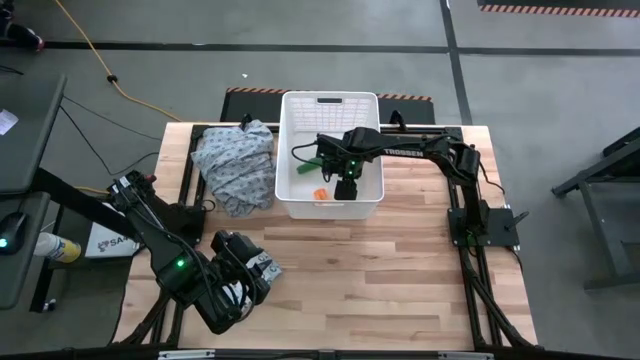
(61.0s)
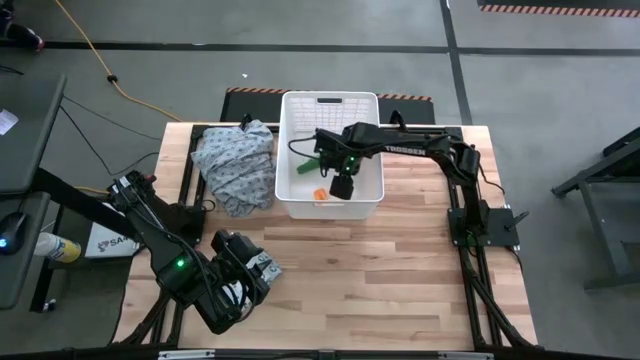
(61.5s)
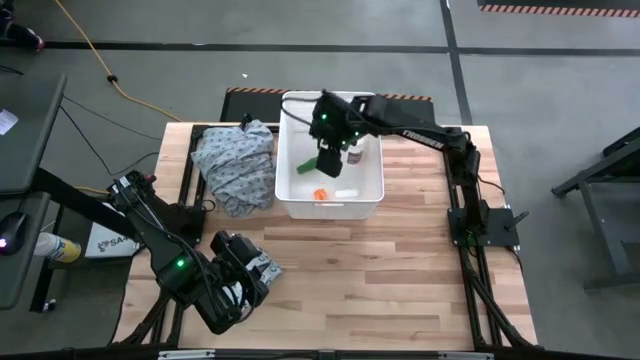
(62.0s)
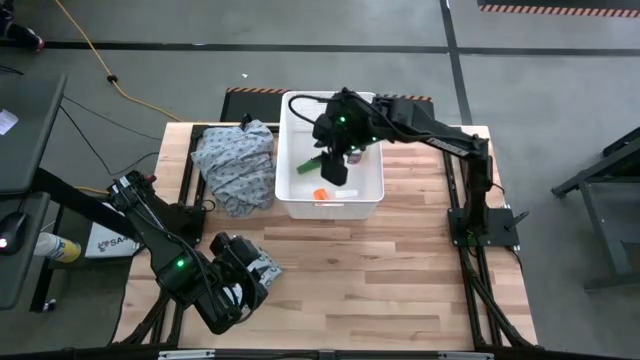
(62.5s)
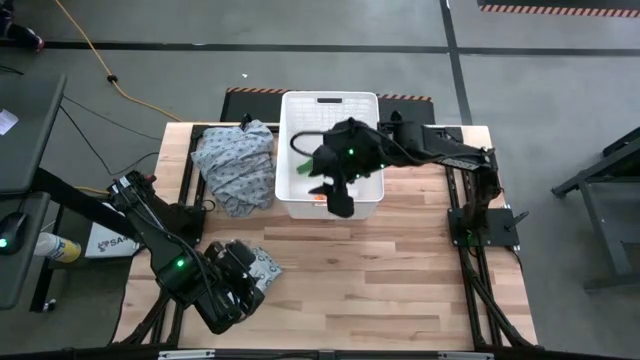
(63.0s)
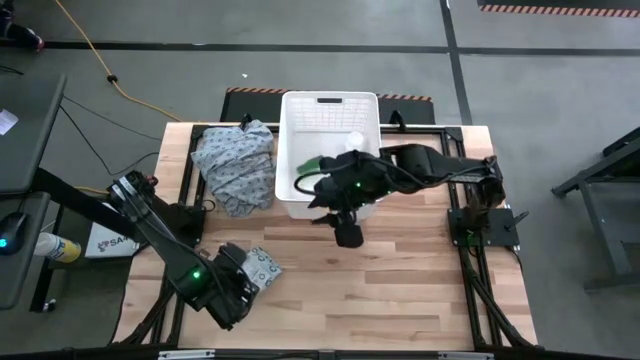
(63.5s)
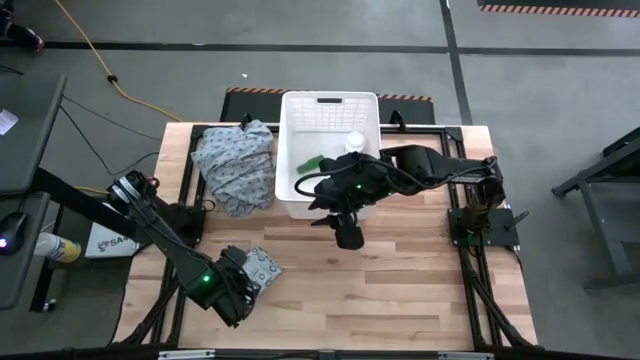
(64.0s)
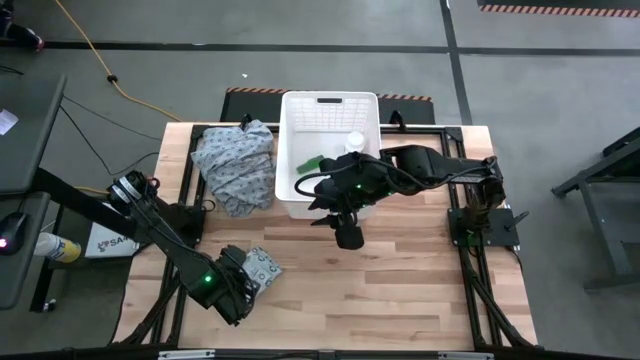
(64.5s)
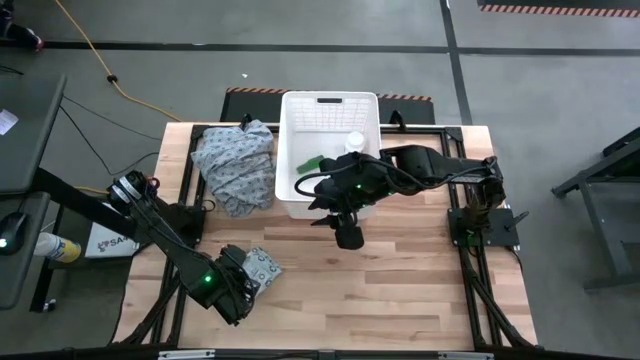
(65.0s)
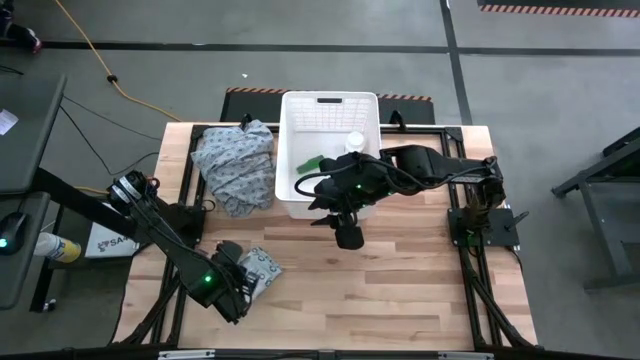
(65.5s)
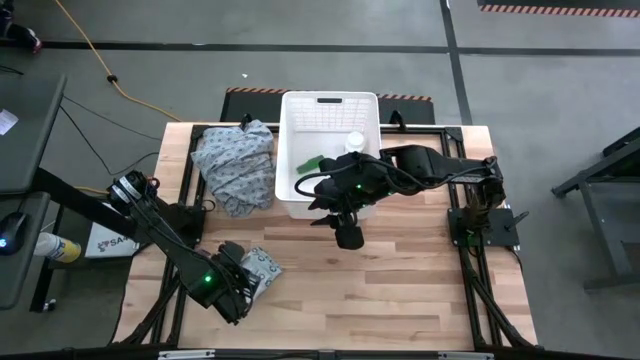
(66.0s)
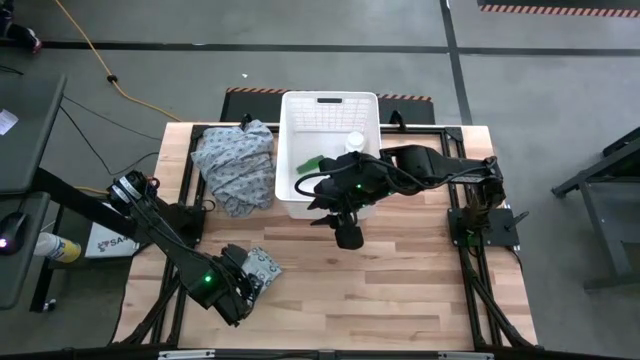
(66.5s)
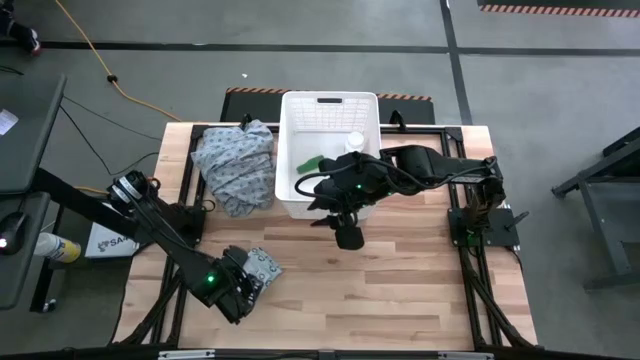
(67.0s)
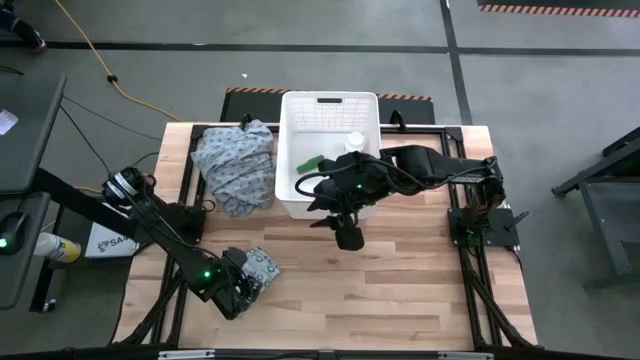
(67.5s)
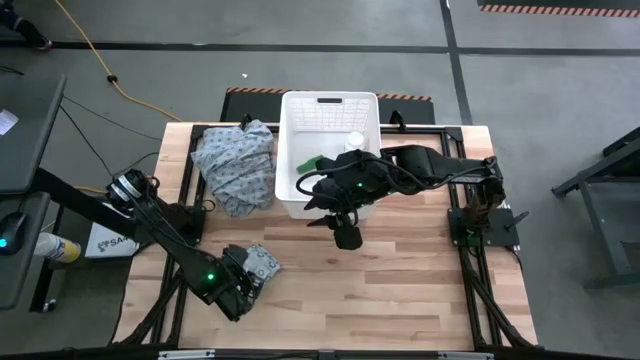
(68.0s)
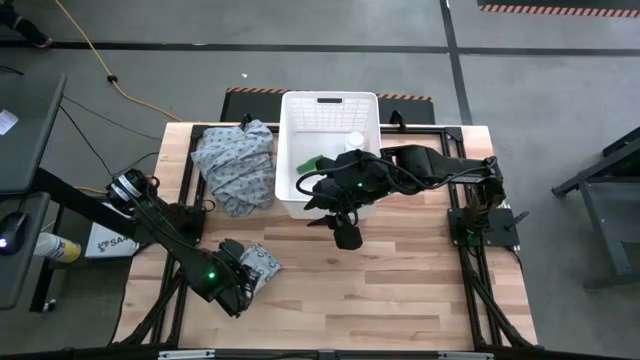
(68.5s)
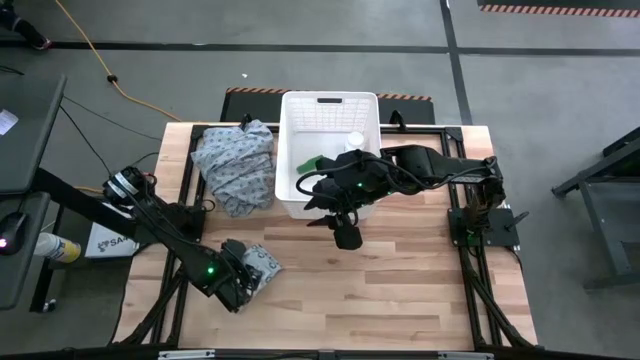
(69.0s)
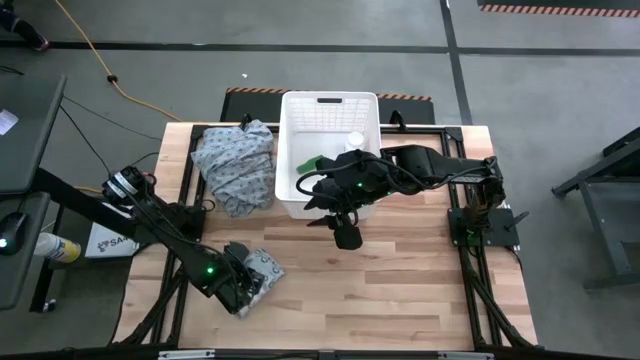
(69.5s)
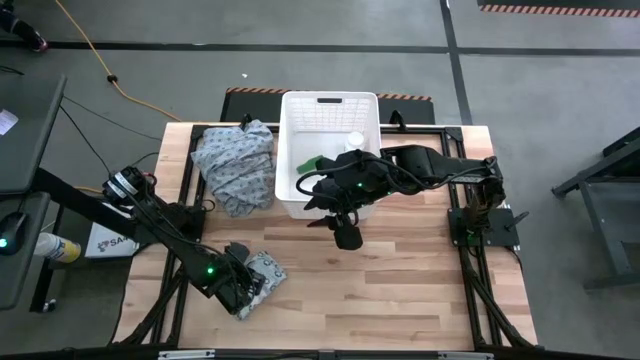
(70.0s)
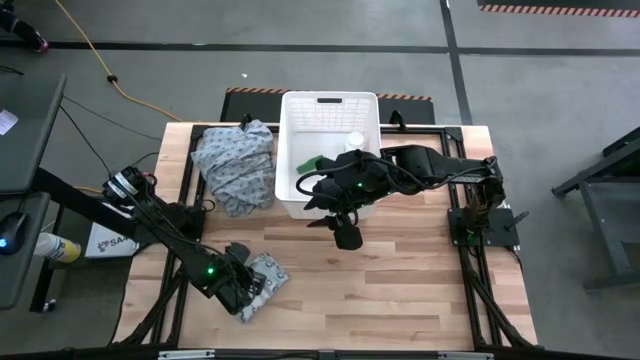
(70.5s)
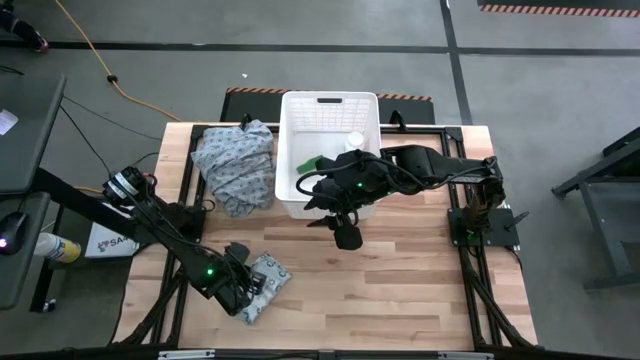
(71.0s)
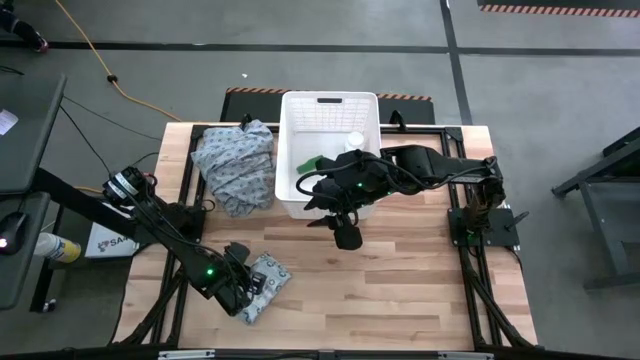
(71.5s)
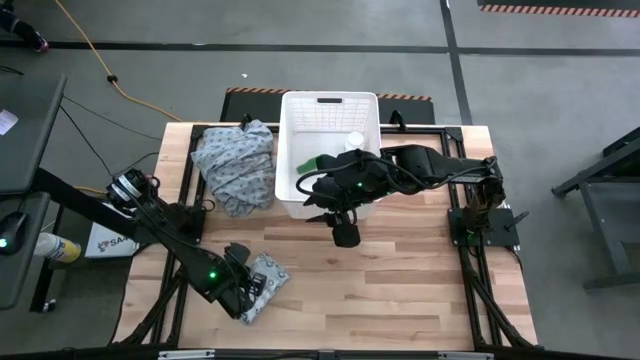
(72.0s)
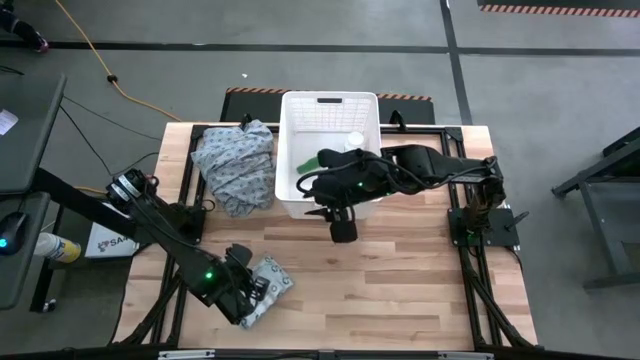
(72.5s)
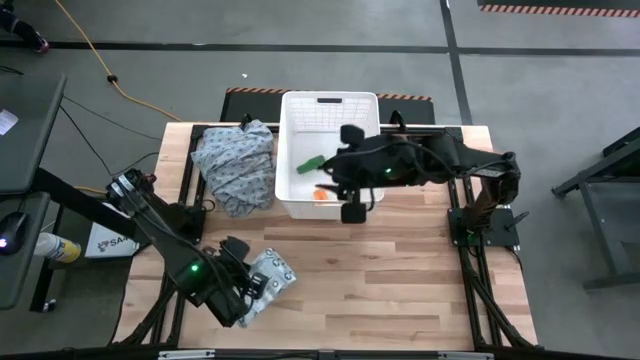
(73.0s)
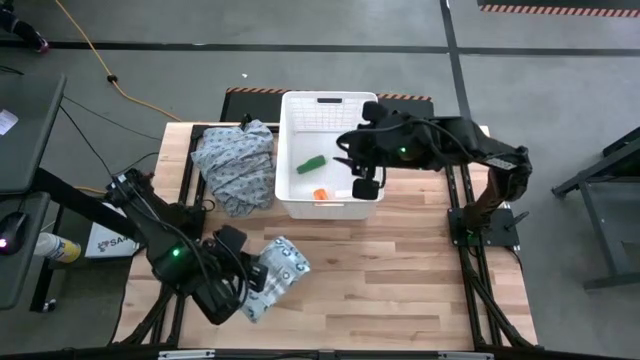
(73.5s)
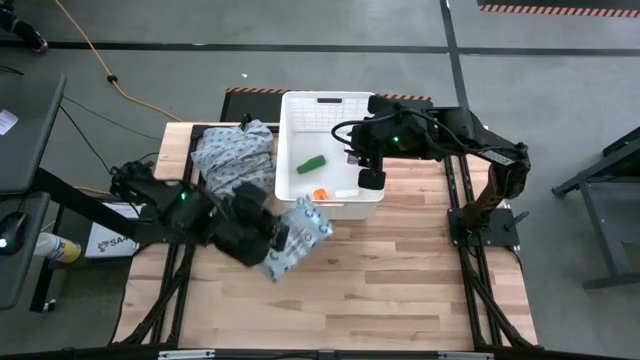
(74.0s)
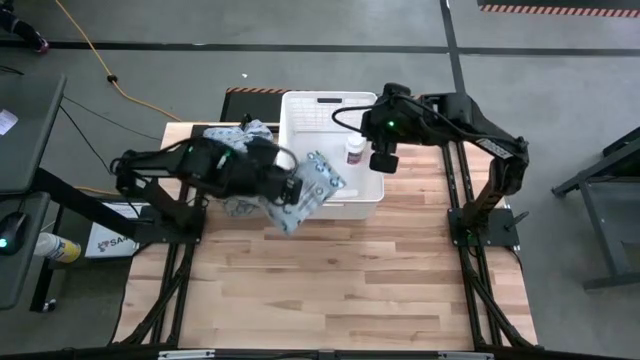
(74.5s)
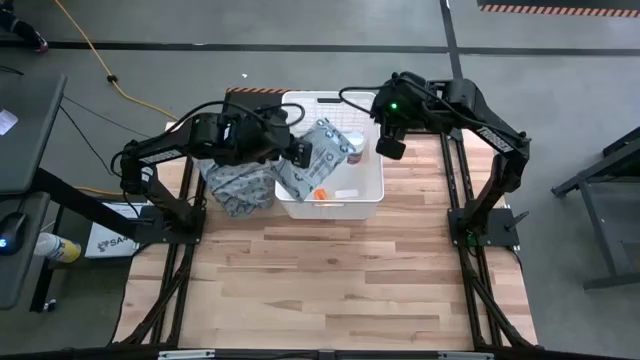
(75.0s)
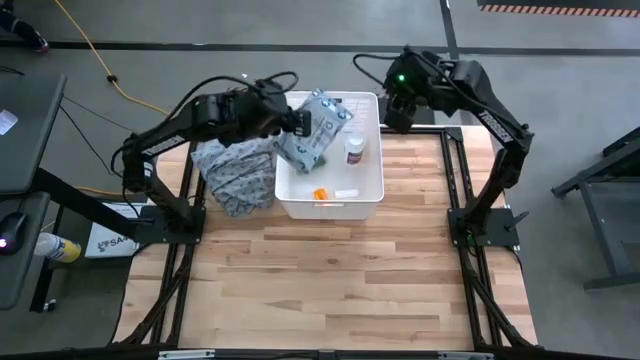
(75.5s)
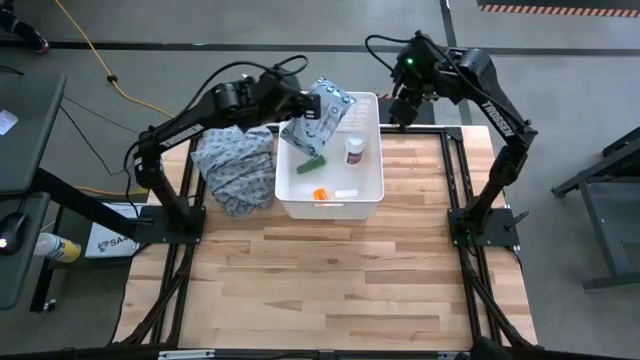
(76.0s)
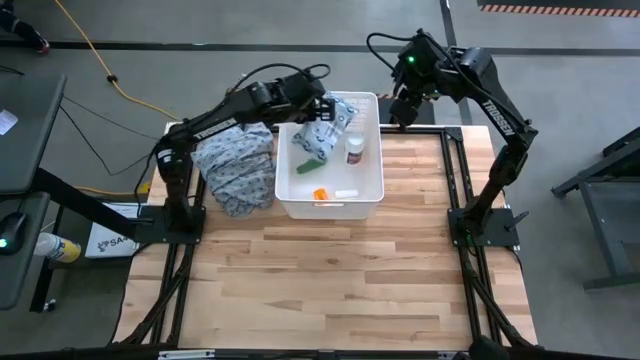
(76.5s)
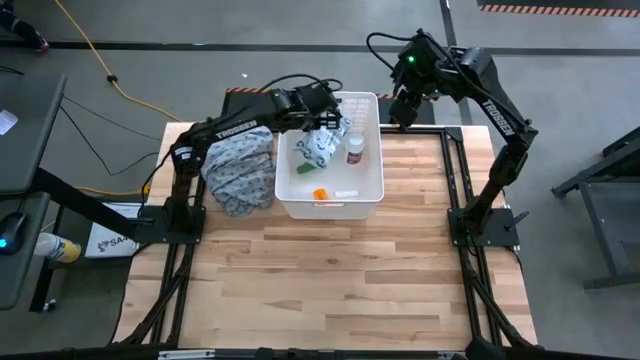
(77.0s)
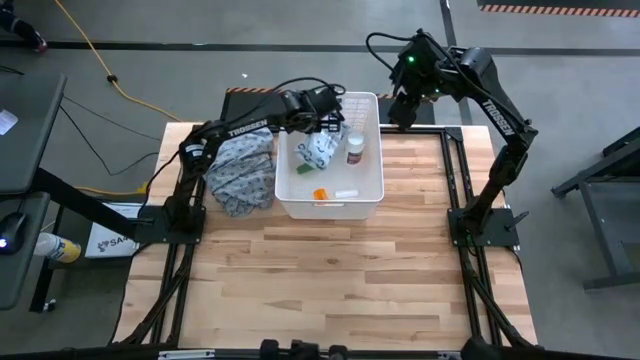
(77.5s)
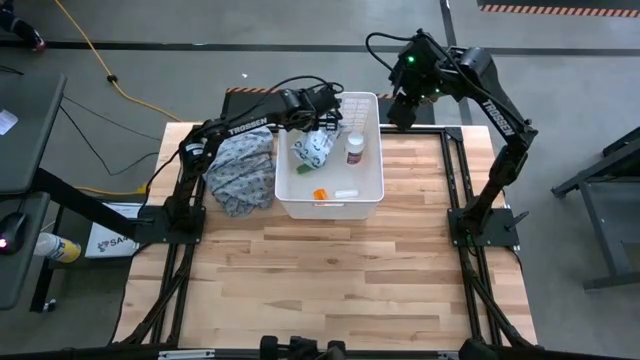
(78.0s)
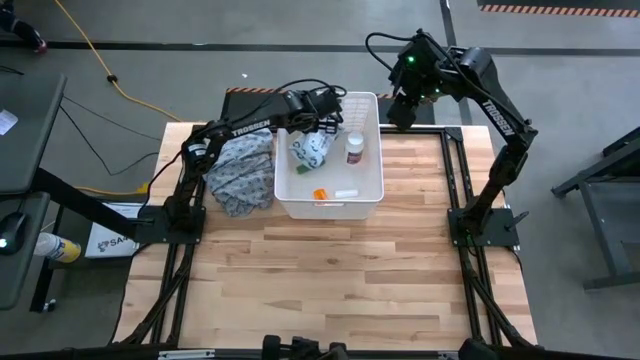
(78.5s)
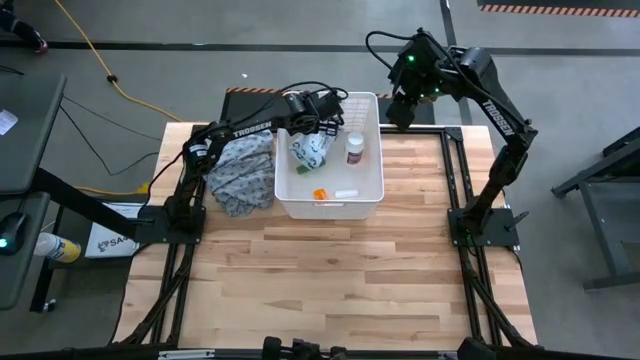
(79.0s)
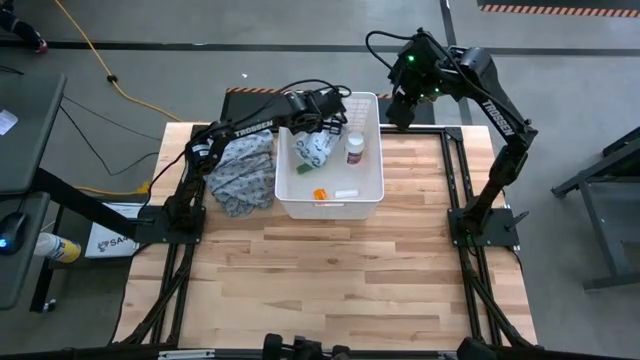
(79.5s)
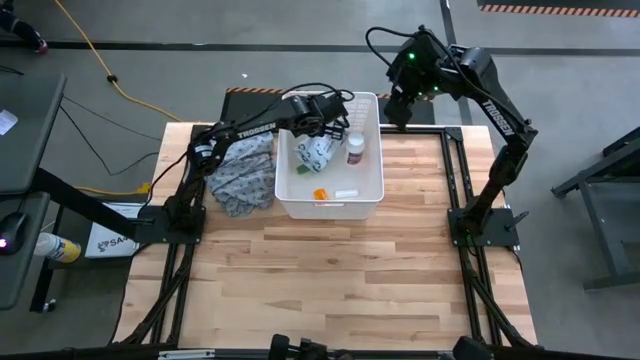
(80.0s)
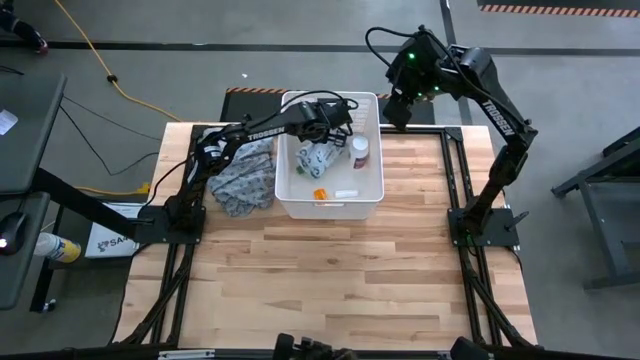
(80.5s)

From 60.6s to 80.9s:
Task: Pick & place medical supplies in basket/bin
Put the mailer bag into the white bin
